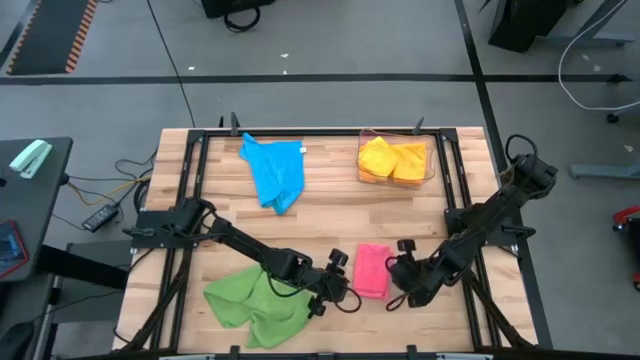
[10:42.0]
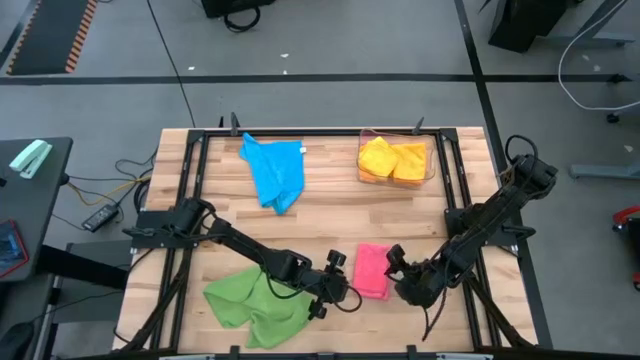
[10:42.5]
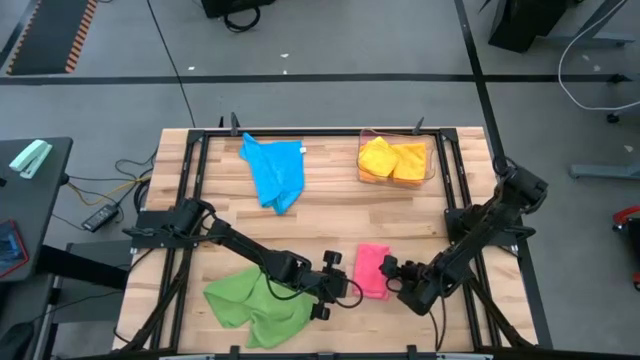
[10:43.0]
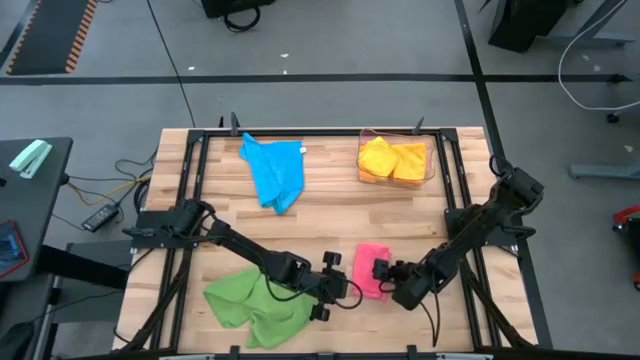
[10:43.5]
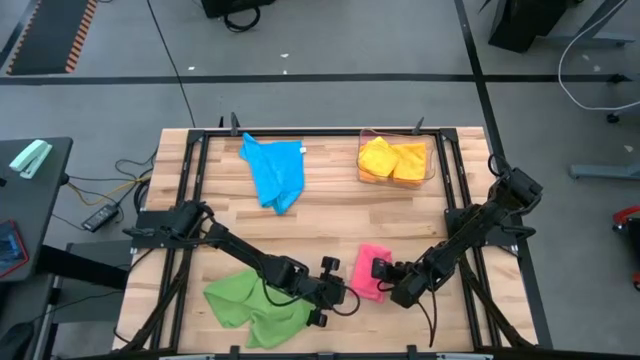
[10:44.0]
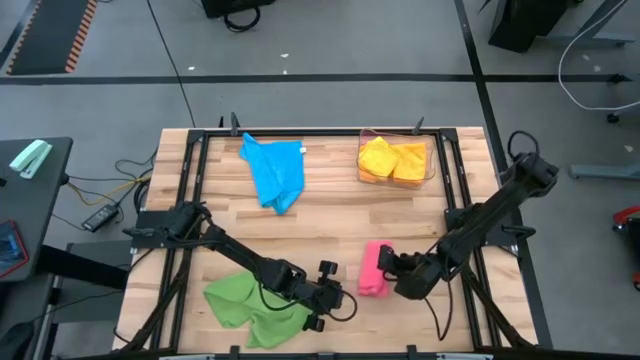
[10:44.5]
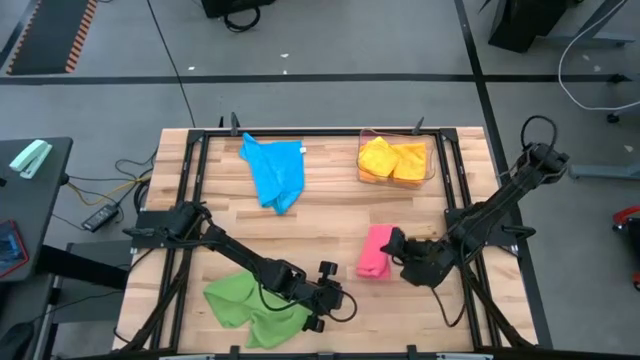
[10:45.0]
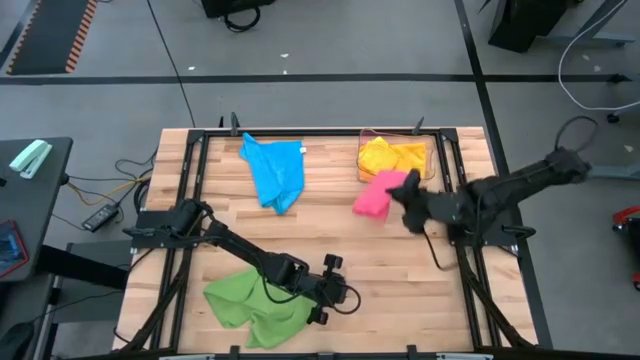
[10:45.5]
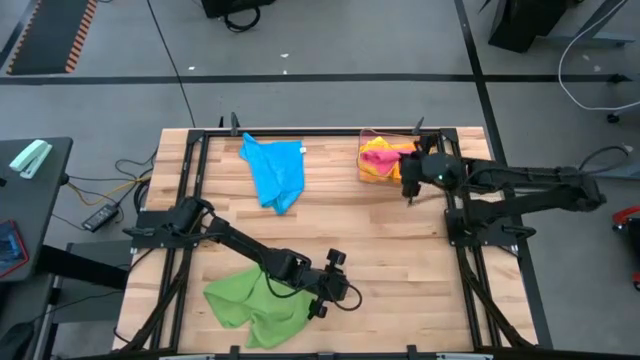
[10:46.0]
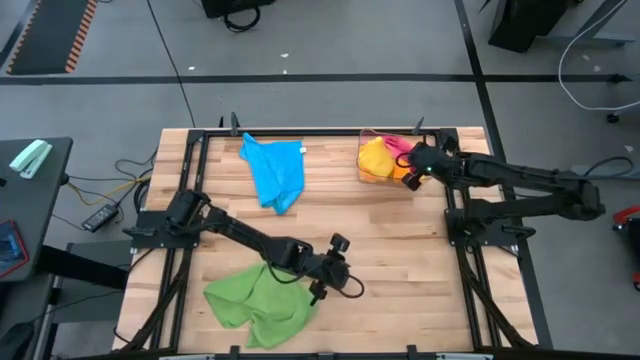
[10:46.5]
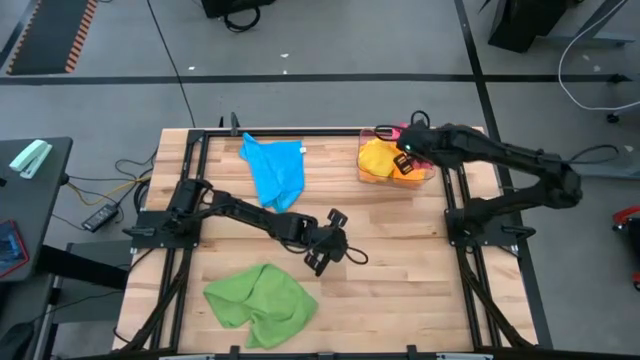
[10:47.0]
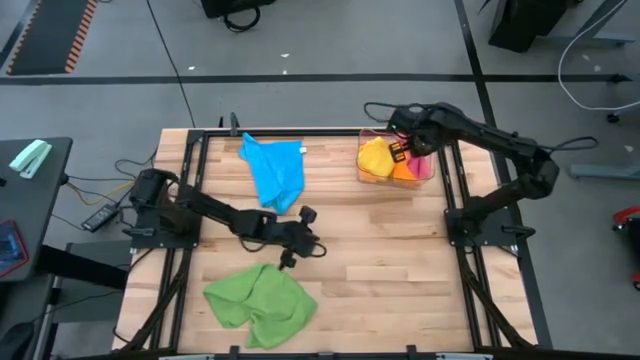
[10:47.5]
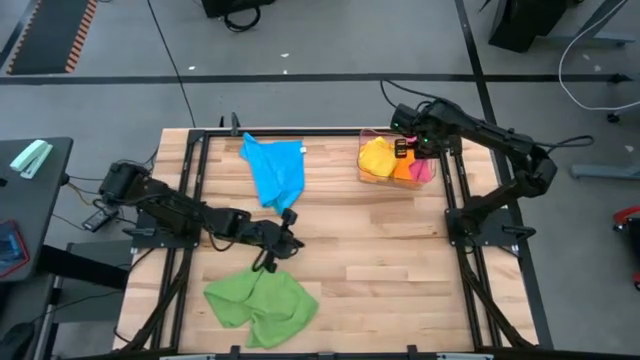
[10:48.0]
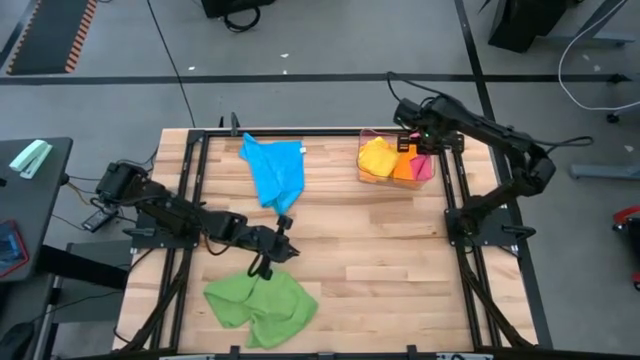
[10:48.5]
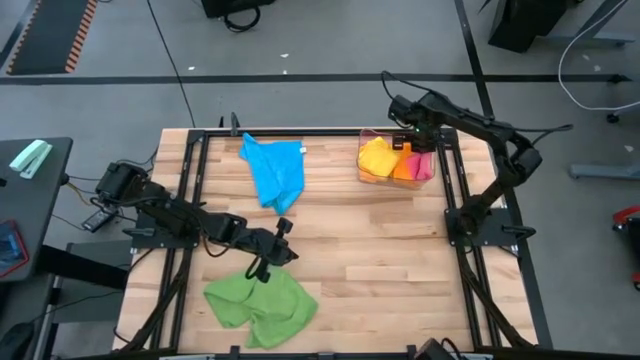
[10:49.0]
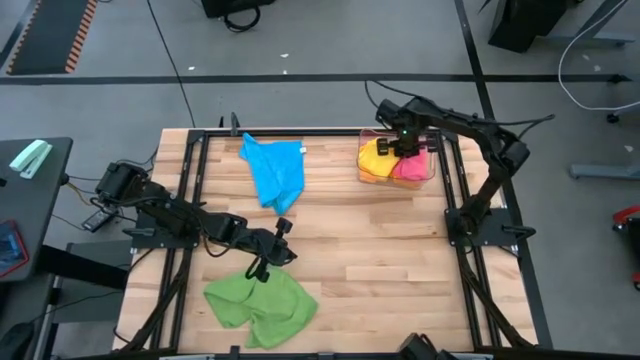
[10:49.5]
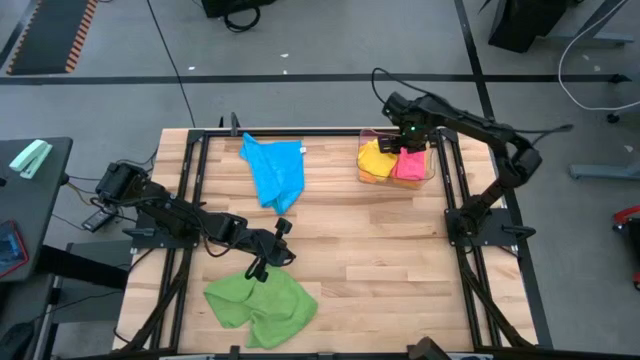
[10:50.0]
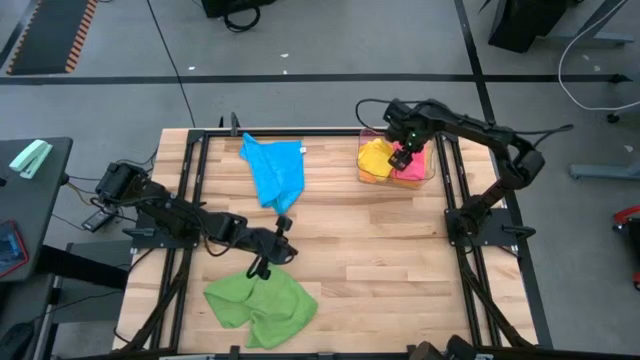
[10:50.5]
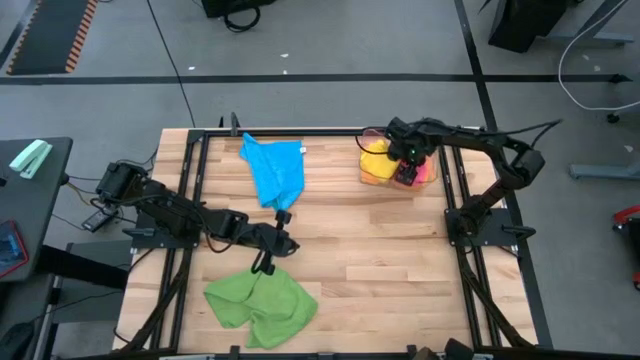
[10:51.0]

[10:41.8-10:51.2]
Task: Fold microfiber towels
Stack the folded pink microfiber cloth on top of the folded orange microfiber cloth

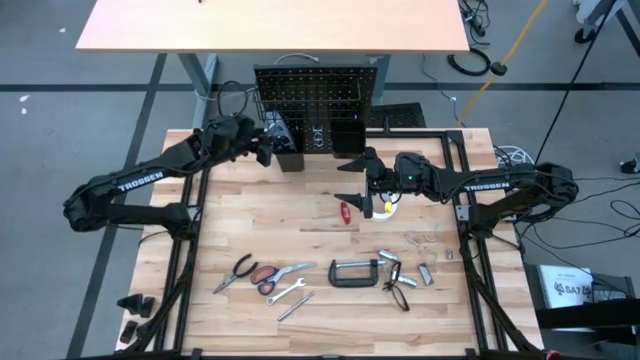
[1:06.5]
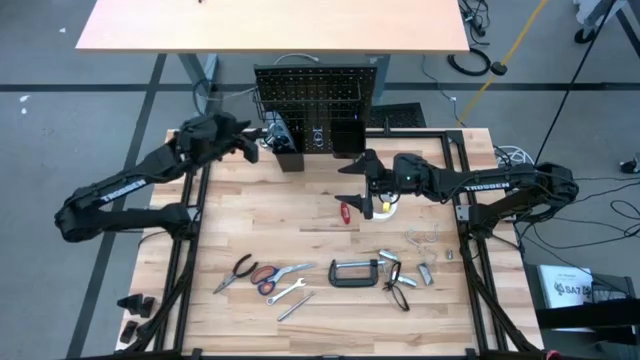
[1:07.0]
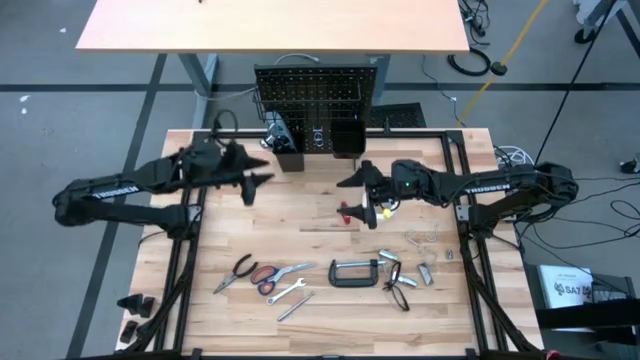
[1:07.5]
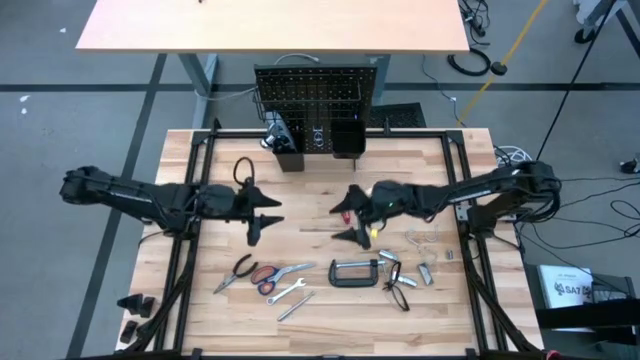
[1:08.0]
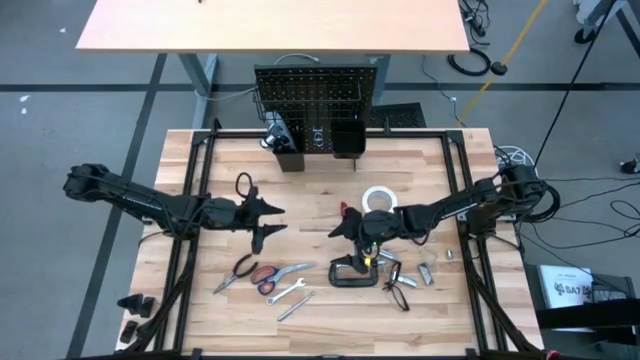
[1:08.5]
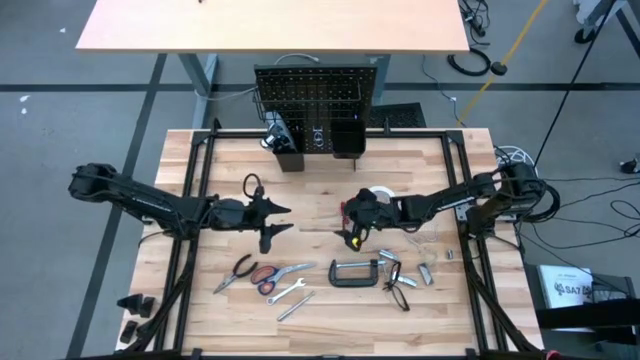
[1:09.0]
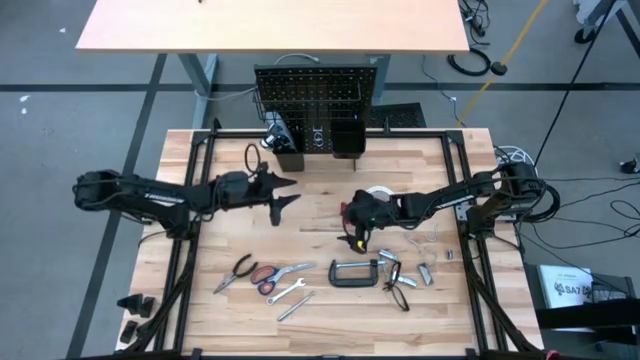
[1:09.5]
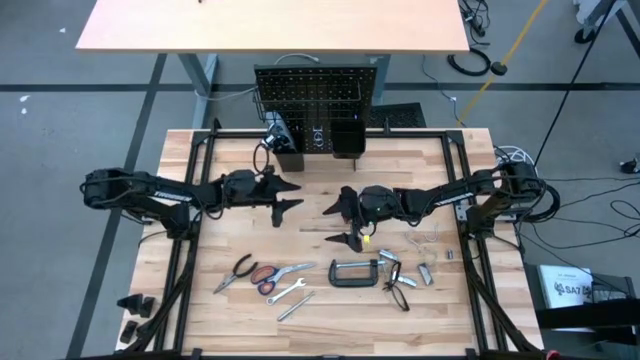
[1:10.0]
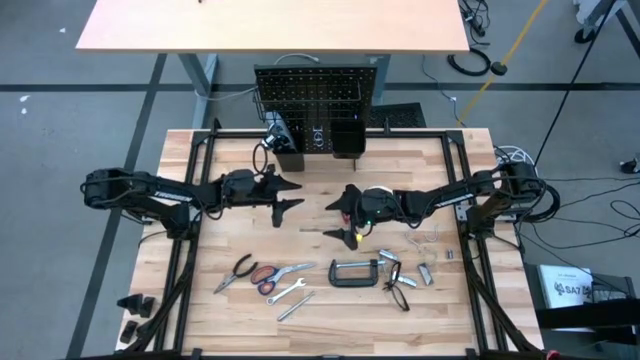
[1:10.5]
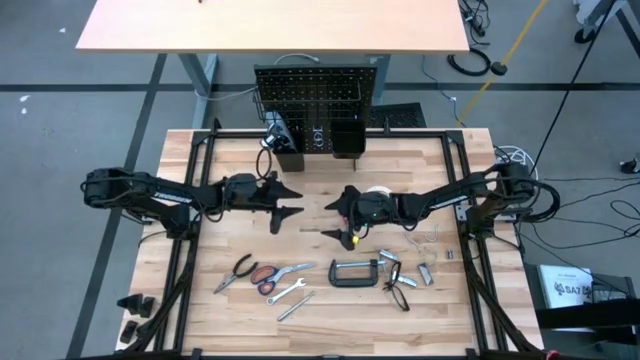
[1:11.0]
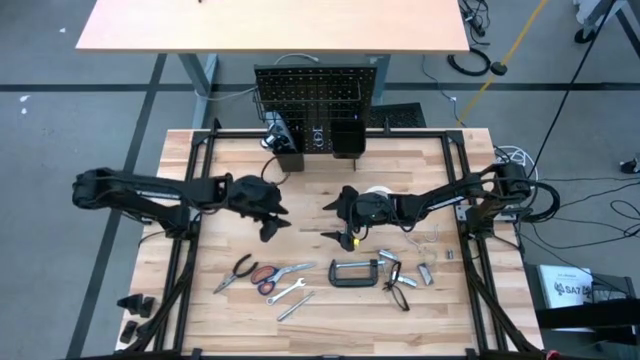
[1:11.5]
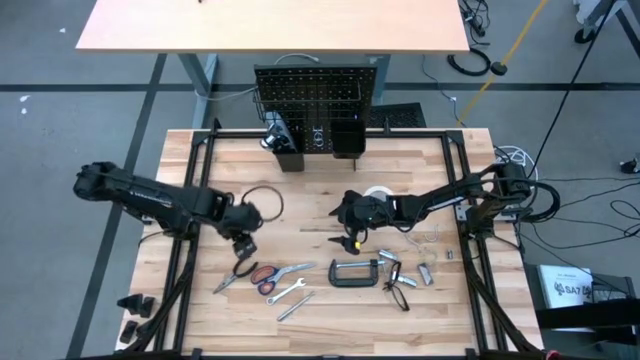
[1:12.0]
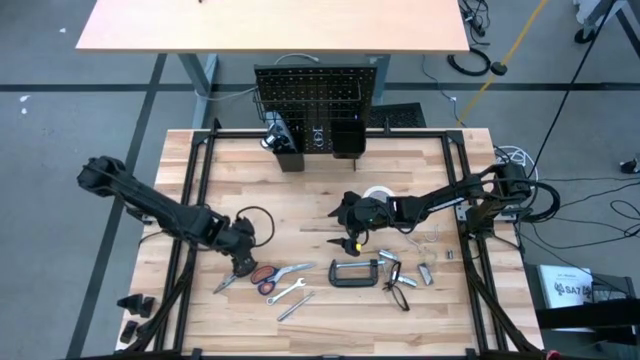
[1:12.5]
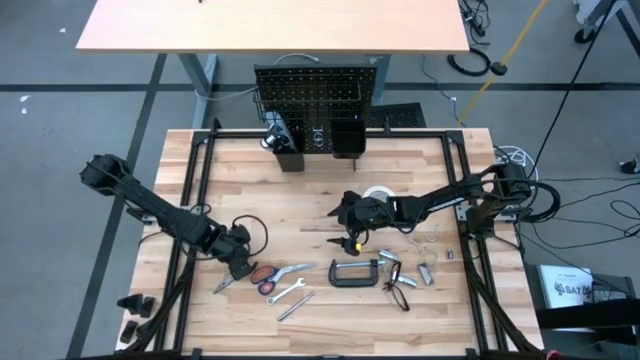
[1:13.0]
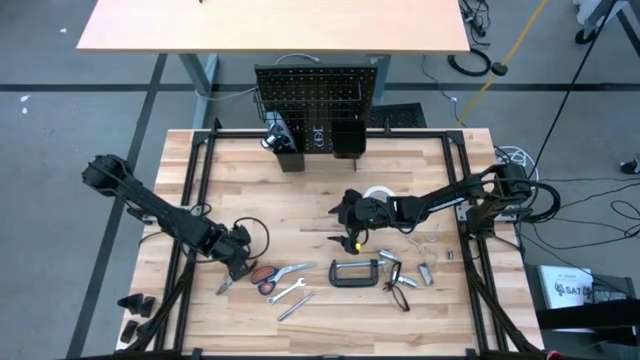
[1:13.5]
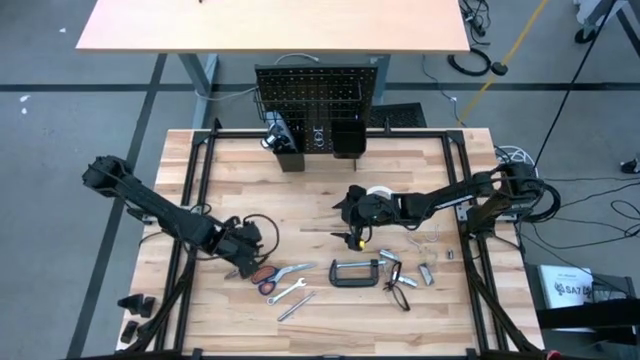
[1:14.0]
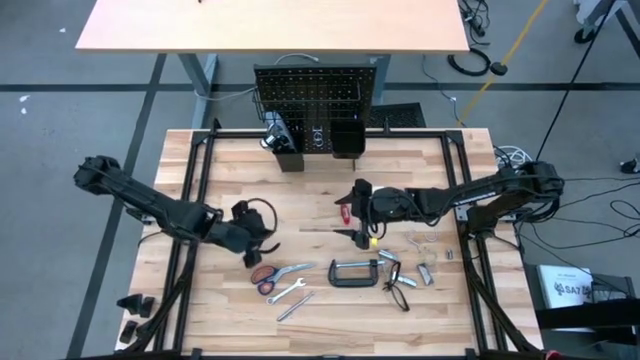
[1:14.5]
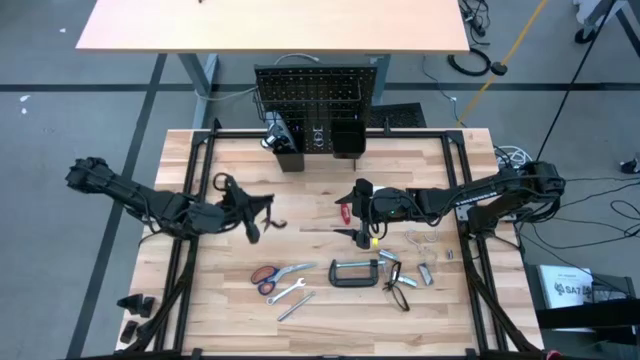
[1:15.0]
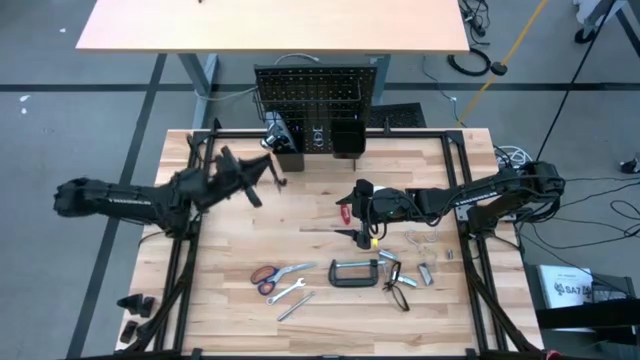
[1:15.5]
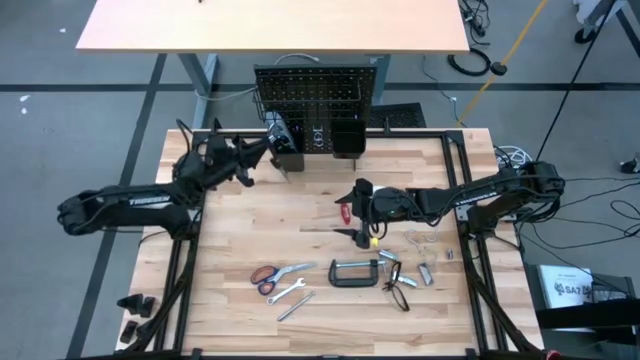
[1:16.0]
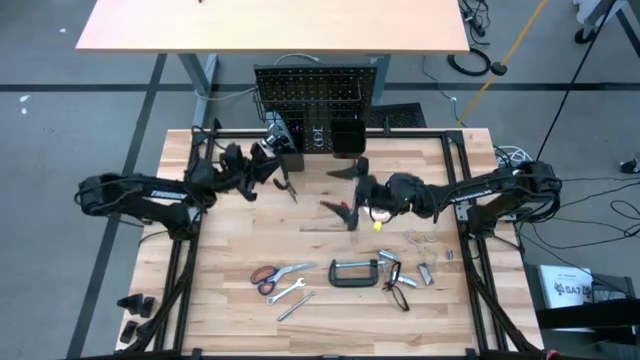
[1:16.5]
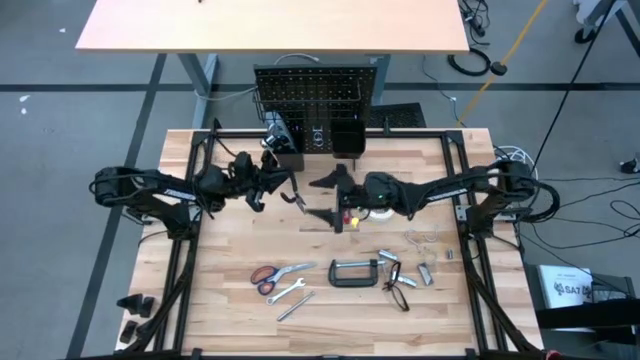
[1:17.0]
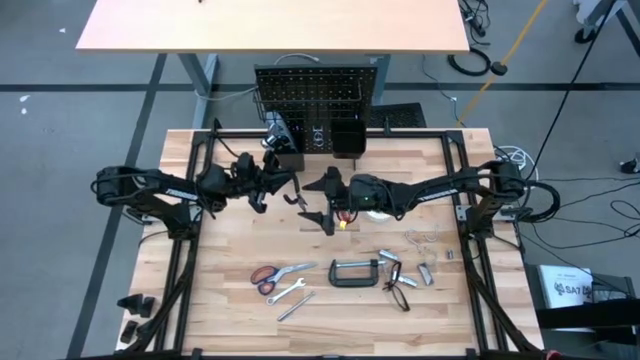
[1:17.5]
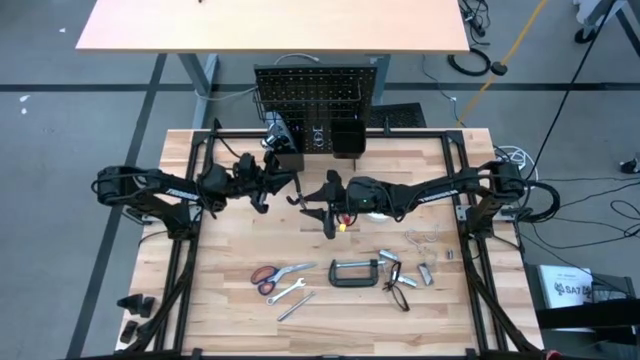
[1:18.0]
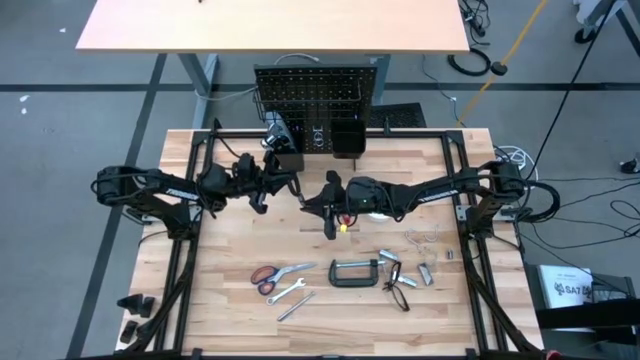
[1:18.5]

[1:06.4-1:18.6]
Task: Hang tools onto peg board
Put the black pliers on the left lower deck of the pegboard
